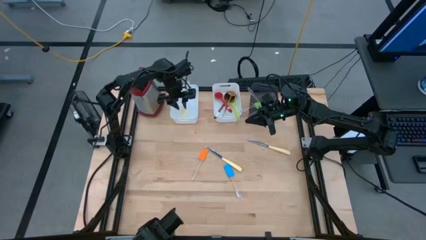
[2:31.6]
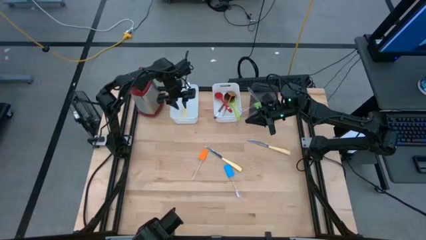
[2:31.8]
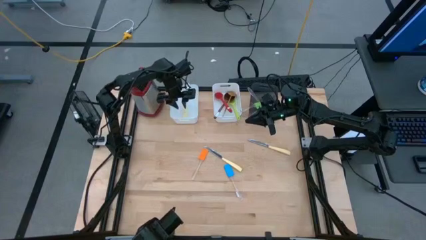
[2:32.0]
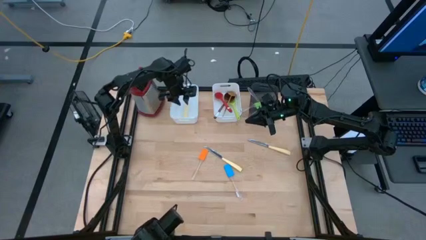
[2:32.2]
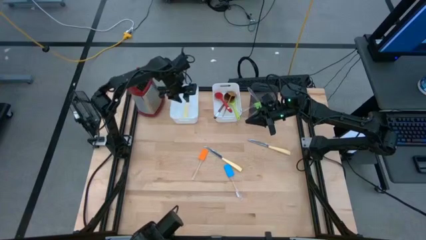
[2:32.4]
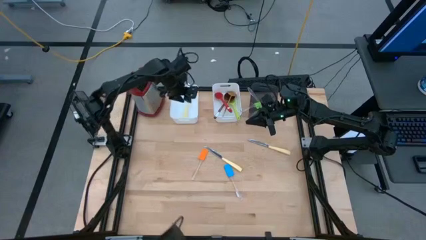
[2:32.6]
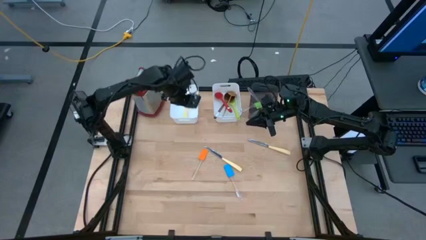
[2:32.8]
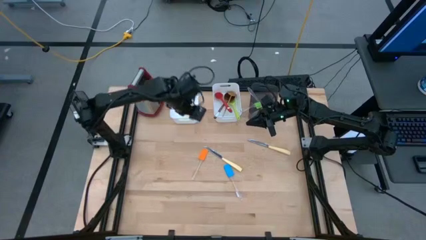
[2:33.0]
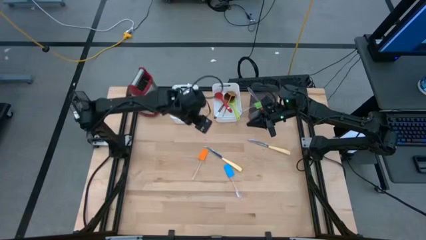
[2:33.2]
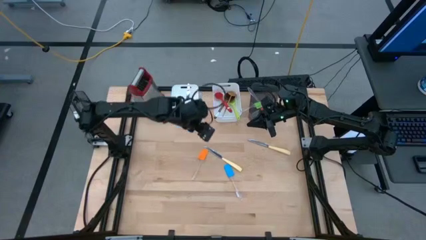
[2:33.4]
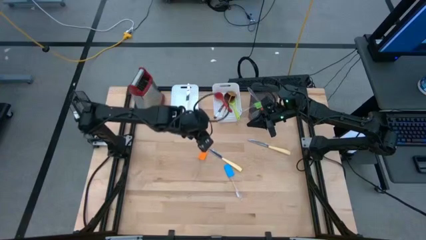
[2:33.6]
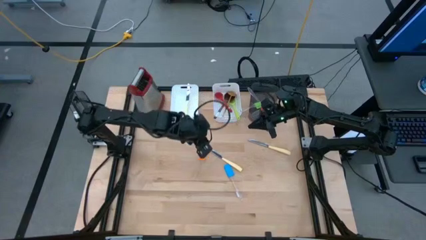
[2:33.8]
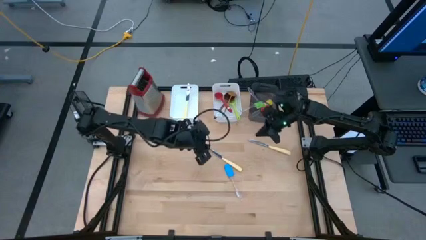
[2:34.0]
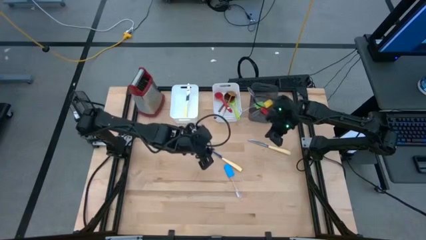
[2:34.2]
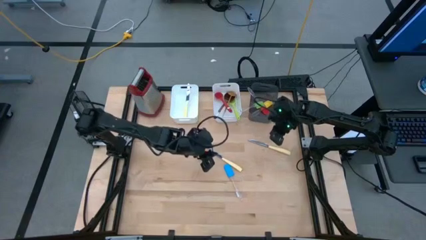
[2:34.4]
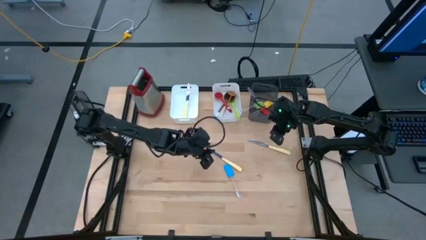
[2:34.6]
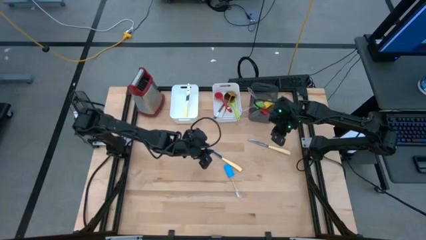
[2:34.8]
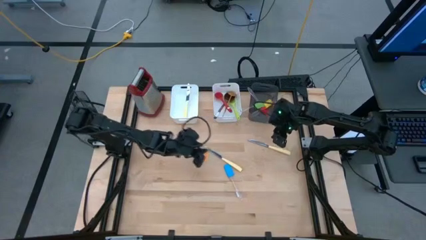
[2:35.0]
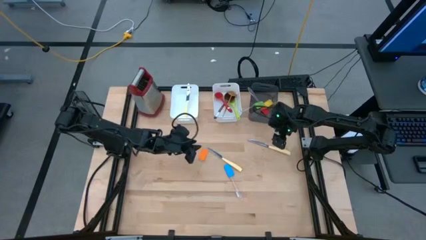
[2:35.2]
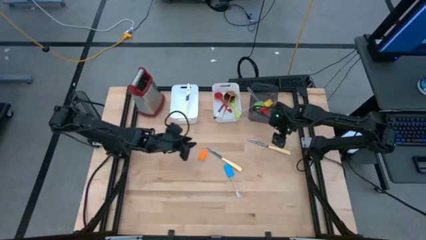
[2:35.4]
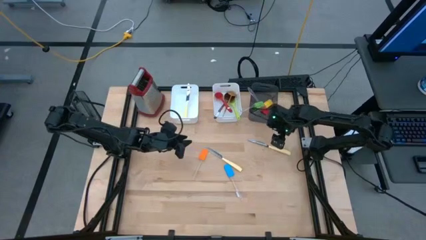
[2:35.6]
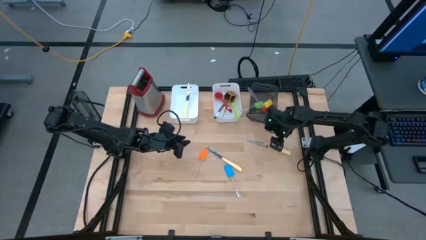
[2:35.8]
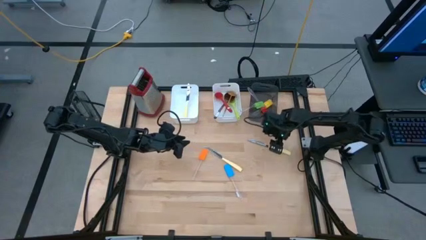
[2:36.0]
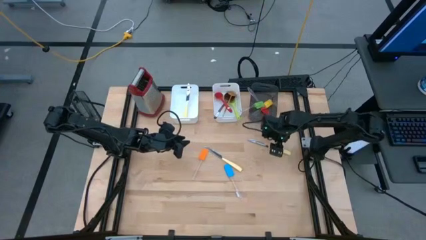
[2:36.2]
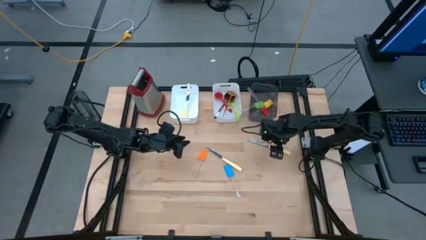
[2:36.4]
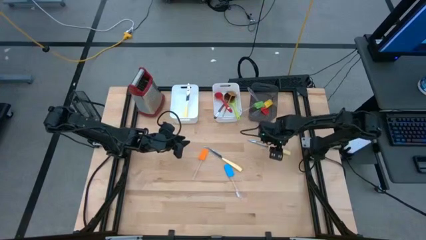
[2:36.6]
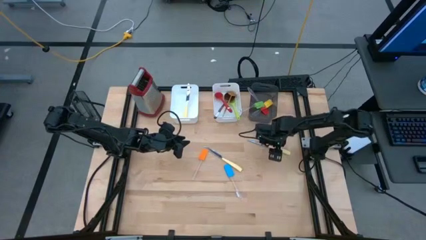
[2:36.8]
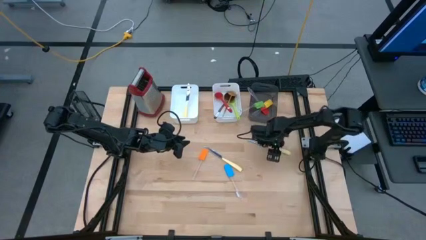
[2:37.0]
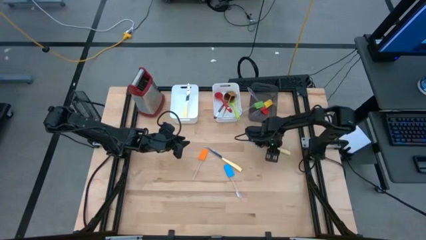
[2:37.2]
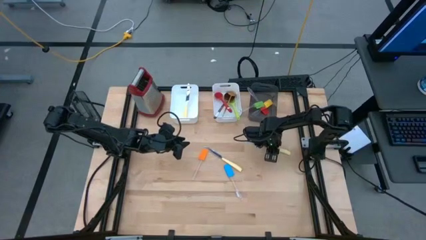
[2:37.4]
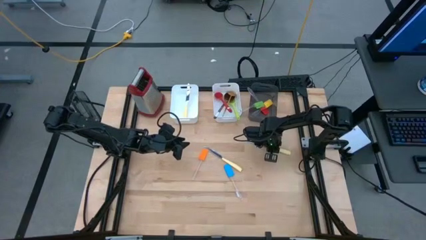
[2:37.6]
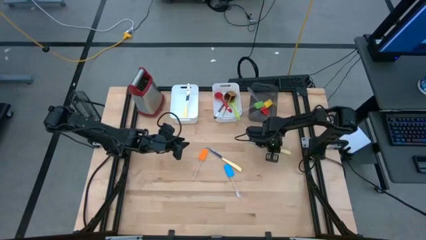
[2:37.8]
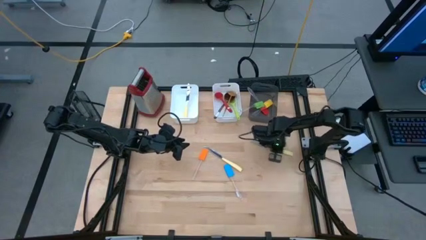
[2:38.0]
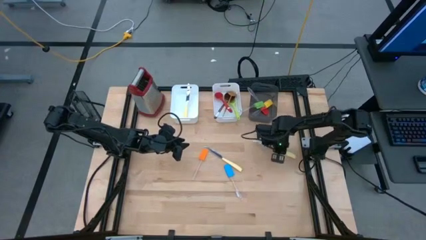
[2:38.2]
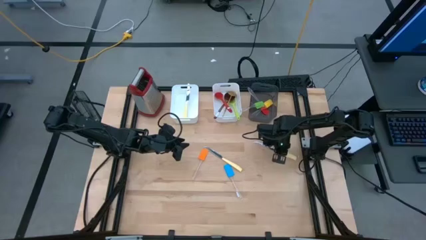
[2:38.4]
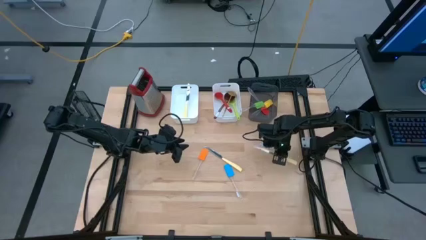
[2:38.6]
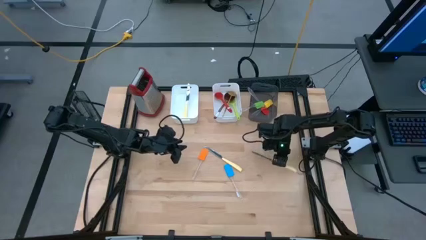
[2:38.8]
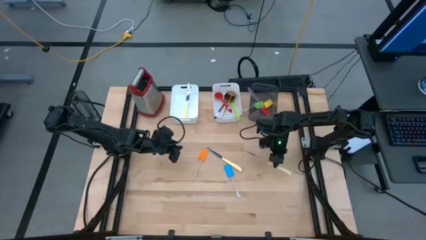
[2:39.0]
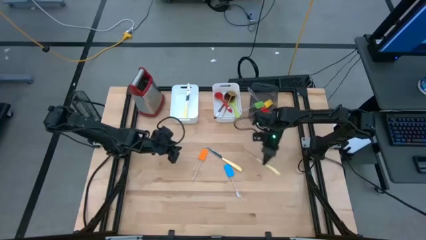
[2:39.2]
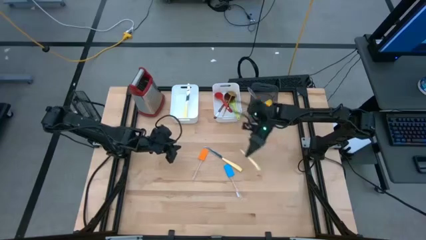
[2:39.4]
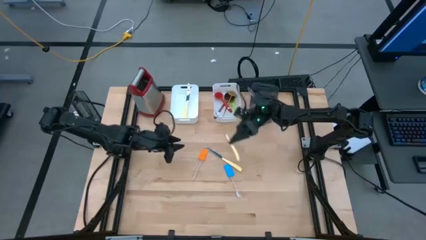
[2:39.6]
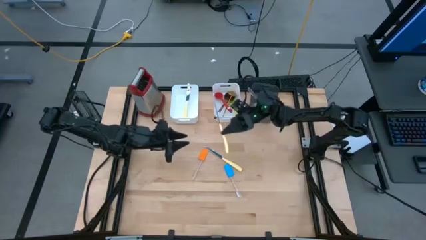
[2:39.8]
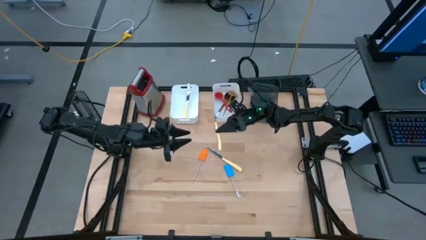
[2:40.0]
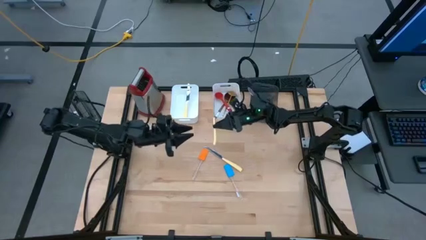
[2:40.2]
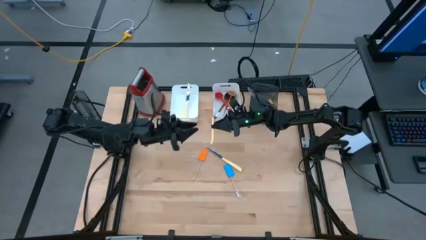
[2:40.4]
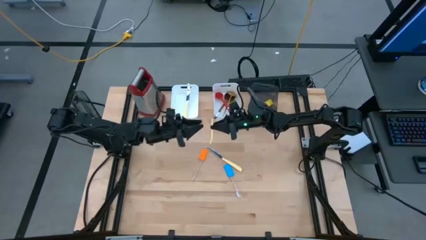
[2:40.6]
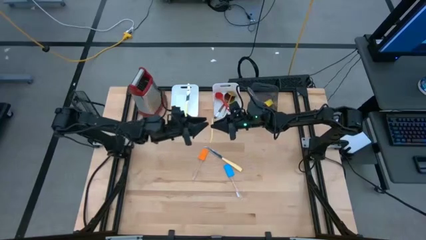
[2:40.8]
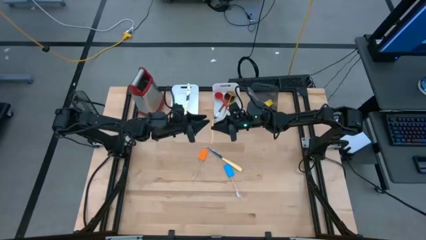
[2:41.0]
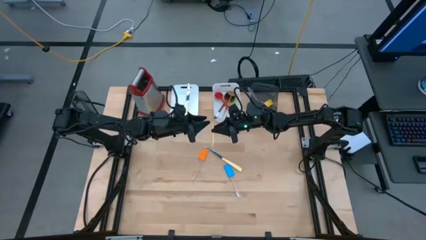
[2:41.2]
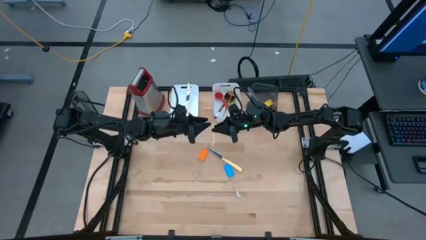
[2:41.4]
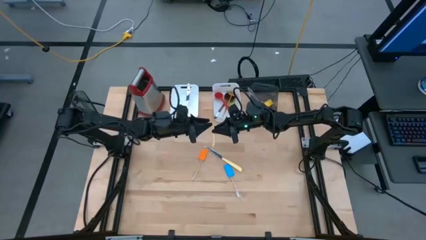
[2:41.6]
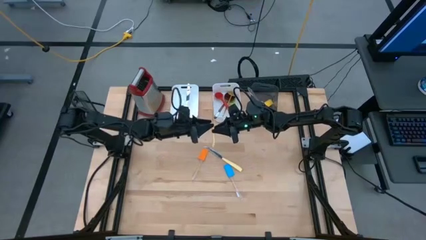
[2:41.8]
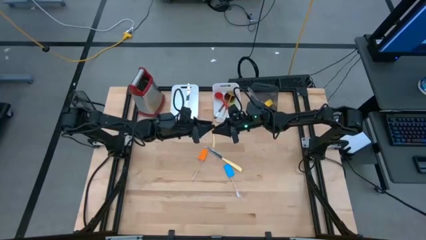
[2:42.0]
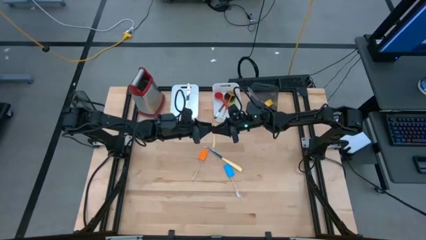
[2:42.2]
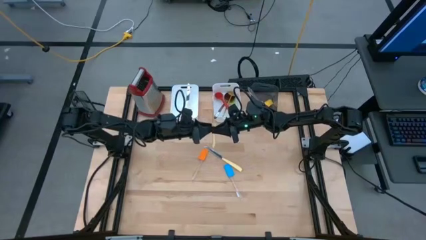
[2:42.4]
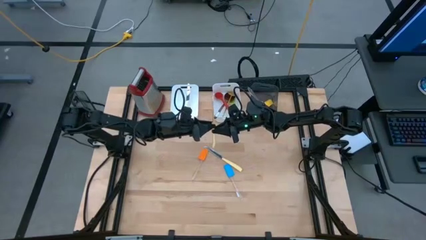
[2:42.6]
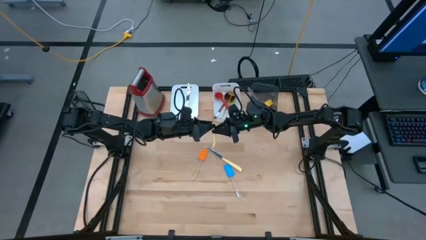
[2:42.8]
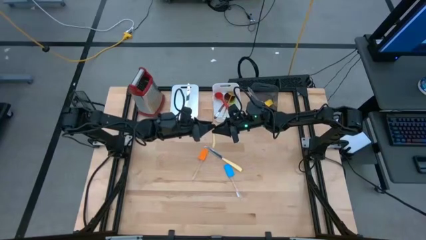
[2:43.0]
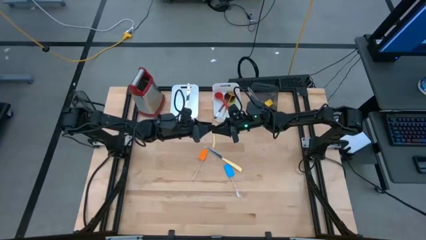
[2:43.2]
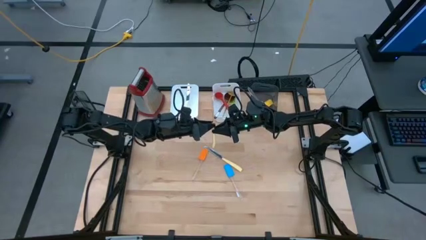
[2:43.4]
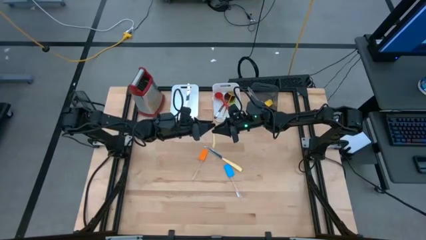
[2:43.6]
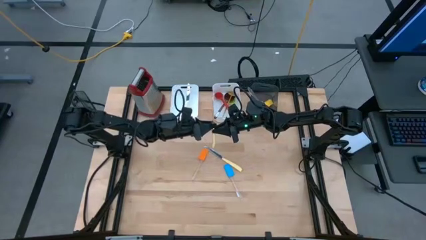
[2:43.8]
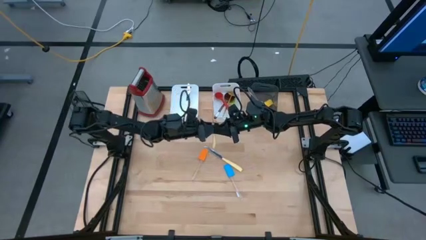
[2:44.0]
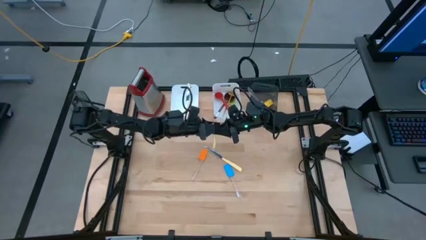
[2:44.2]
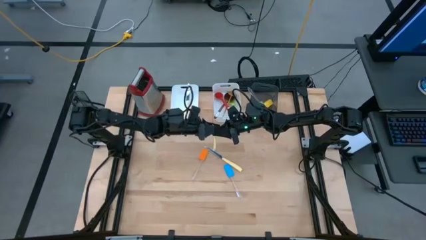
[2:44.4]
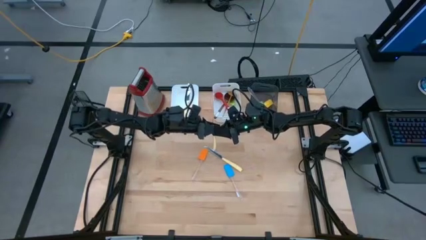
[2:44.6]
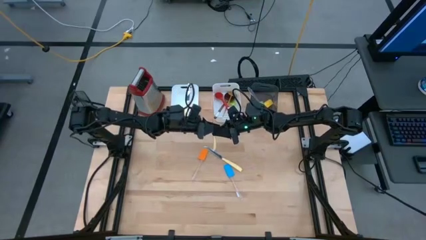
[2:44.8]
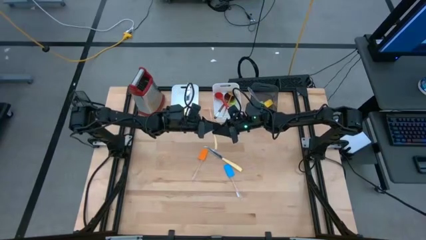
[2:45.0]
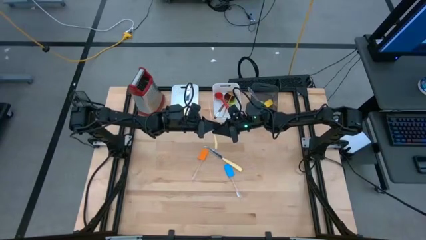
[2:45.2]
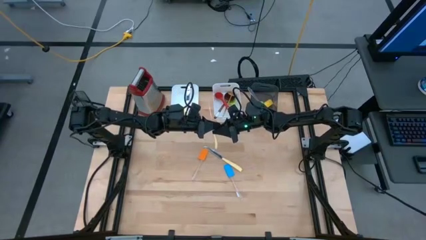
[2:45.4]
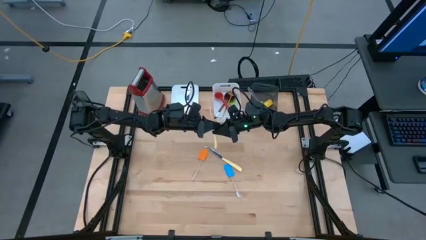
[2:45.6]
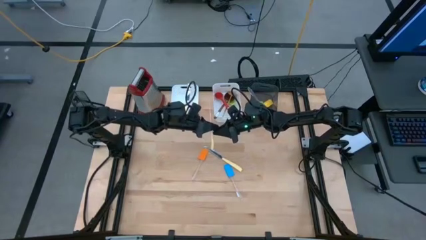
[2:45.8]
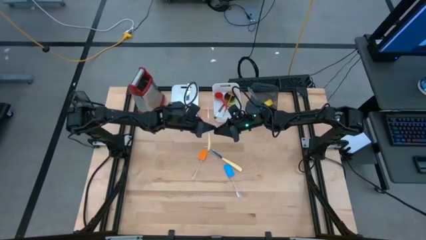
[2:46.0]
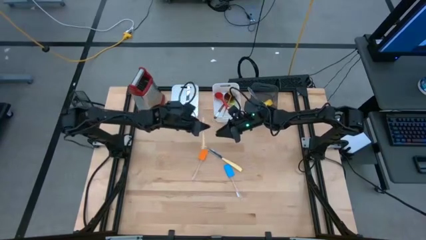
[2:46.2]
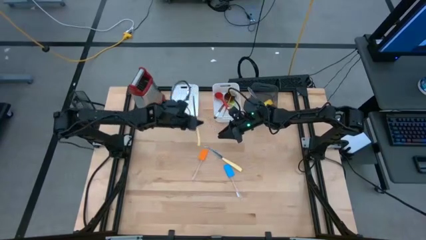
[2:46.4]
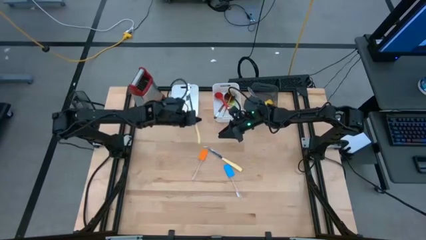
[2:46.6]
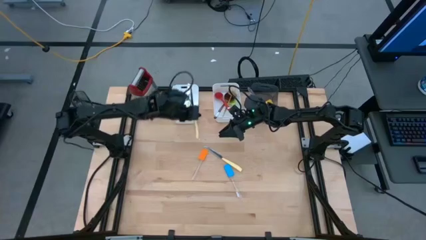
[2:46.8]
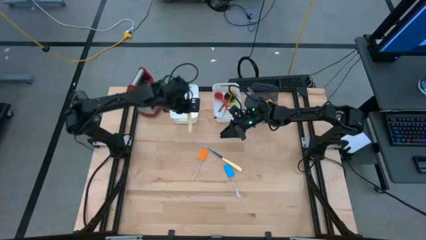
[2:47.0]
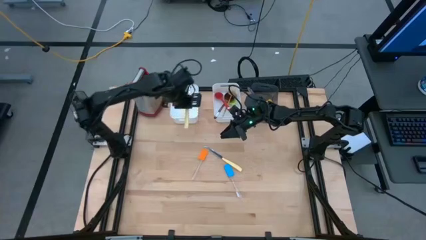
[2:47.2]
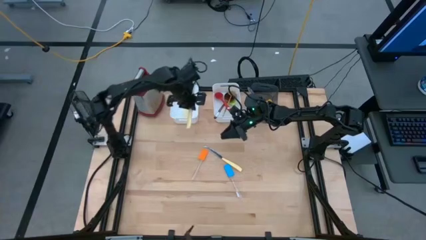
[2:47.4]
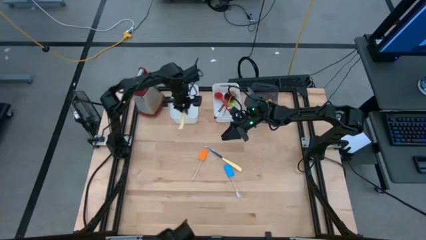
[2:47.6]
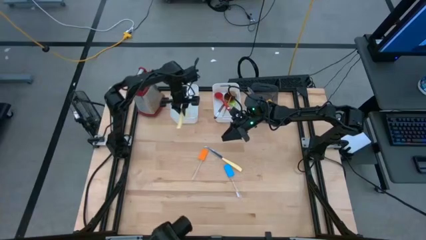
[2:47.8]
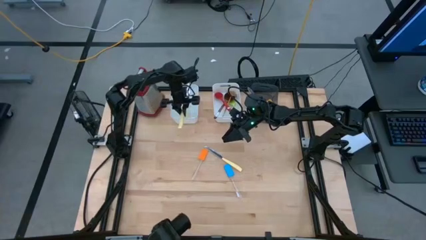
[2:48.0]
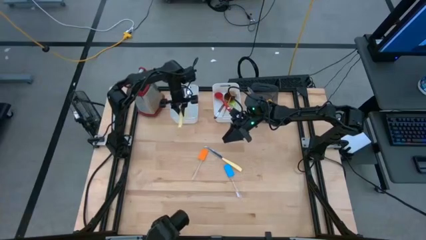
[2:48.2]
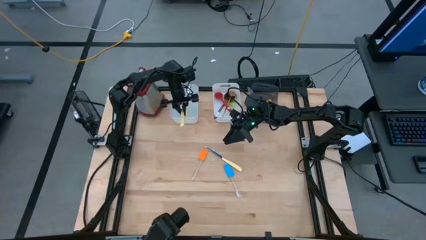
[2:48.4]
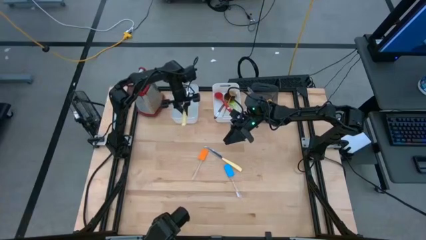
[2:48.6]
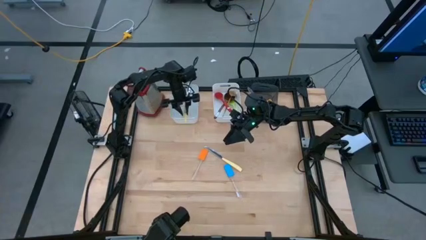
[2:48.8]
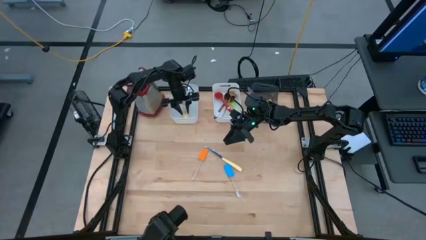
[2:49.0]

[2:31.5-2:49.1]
Task: Pick & Place Kitchen Items
Put the right yellow knife into the left white bin
